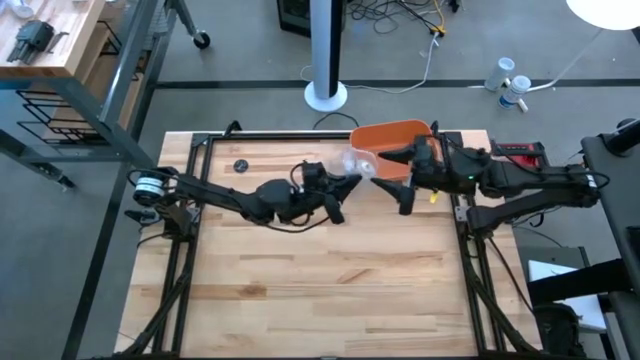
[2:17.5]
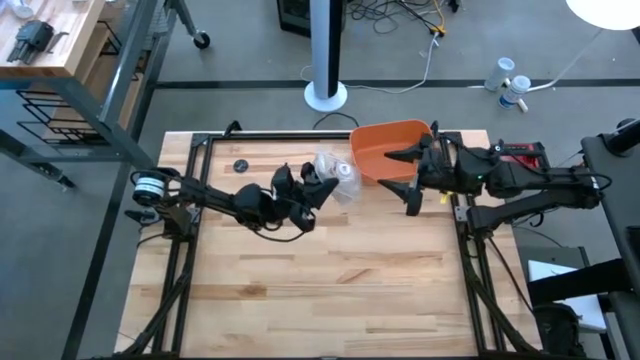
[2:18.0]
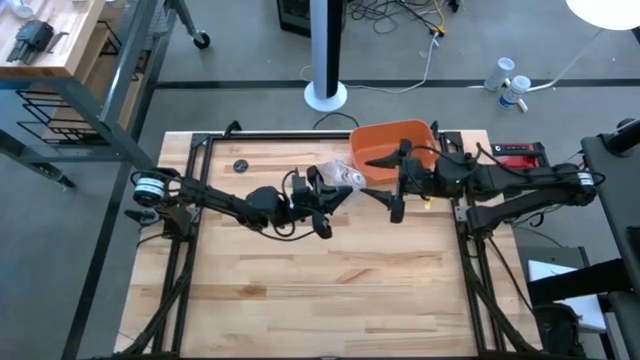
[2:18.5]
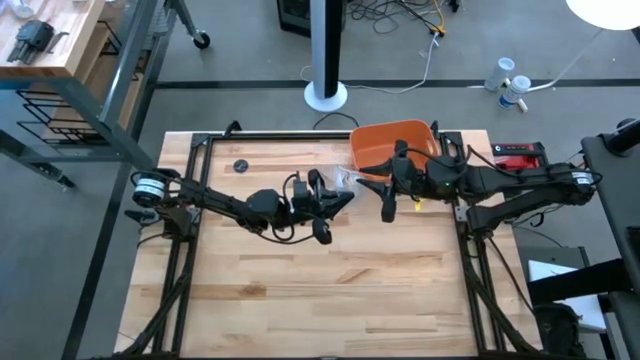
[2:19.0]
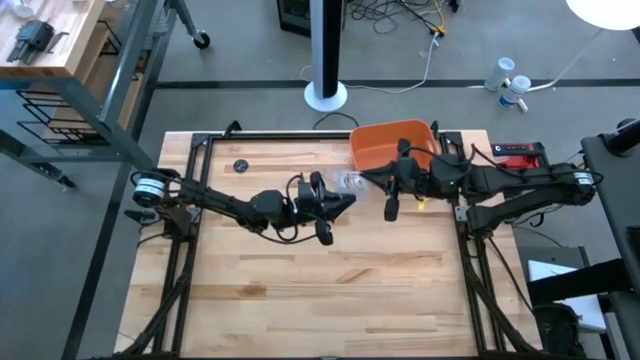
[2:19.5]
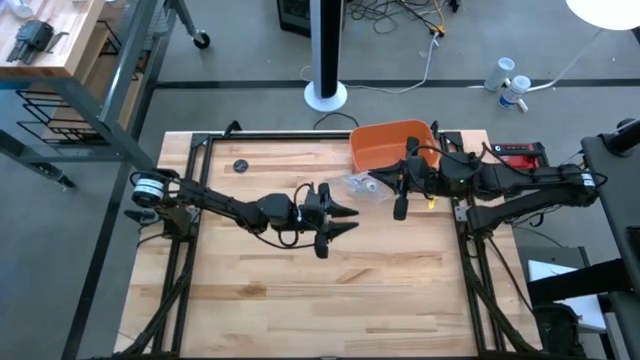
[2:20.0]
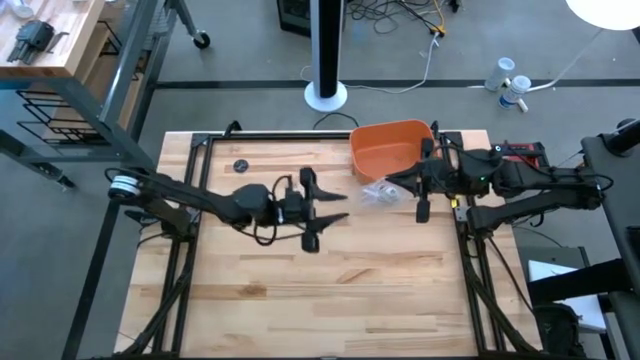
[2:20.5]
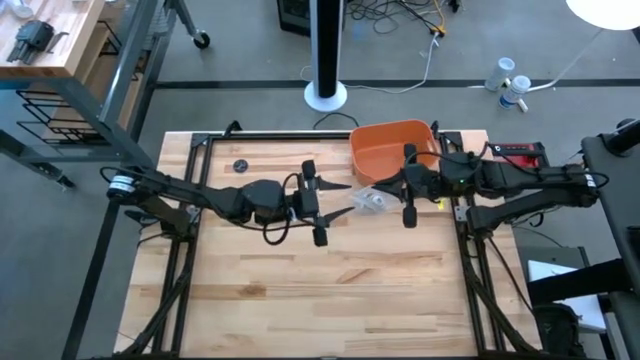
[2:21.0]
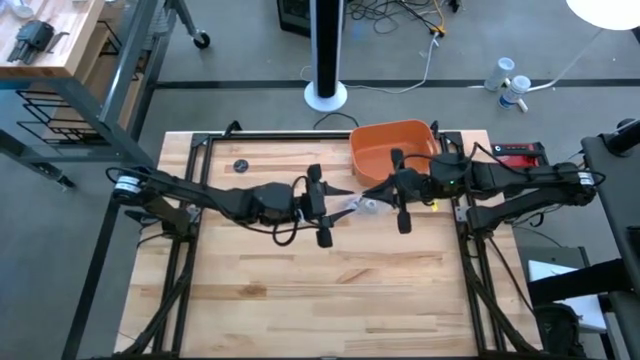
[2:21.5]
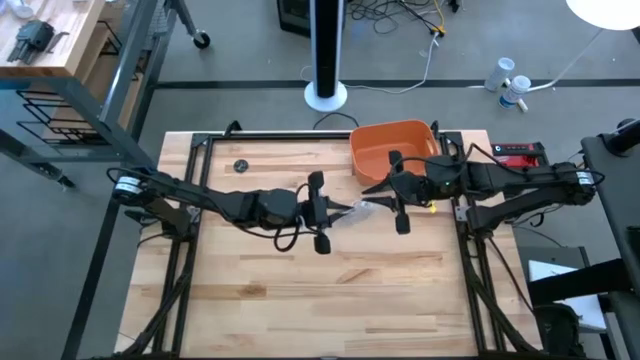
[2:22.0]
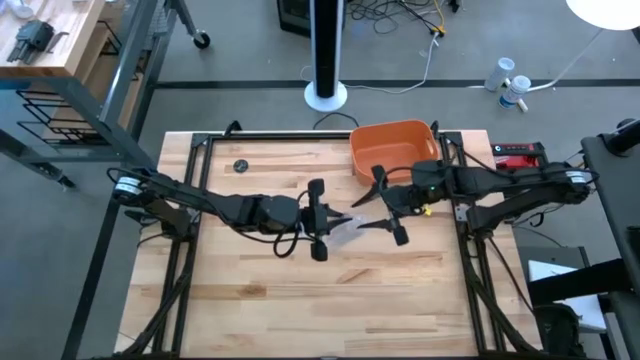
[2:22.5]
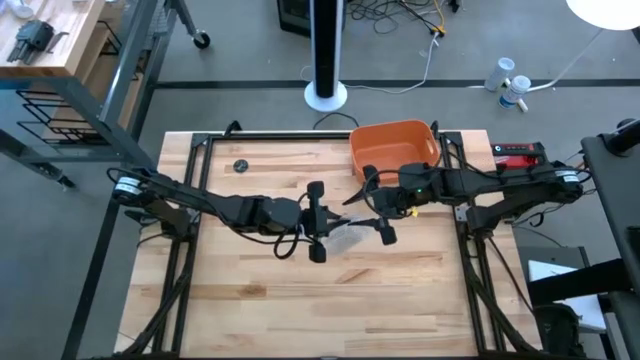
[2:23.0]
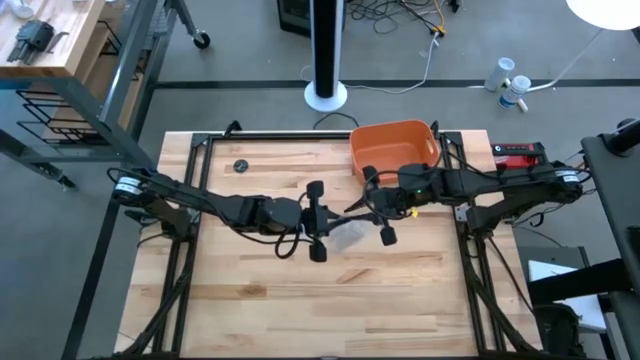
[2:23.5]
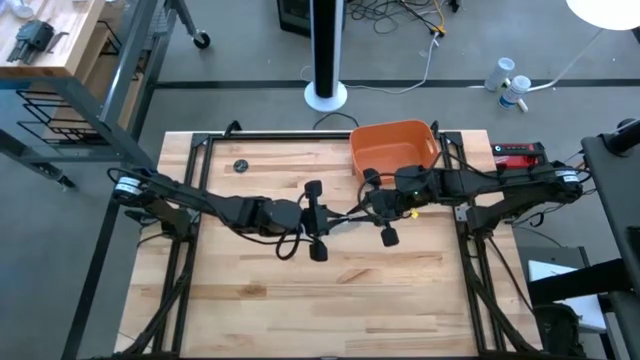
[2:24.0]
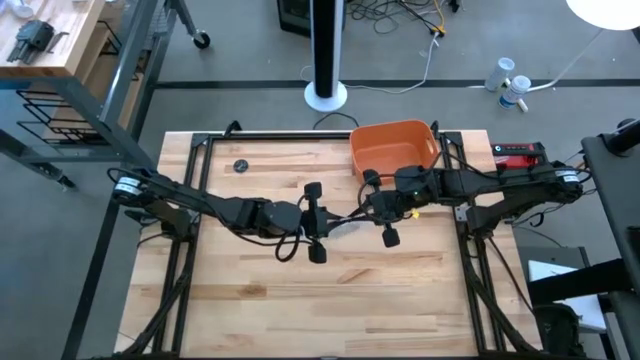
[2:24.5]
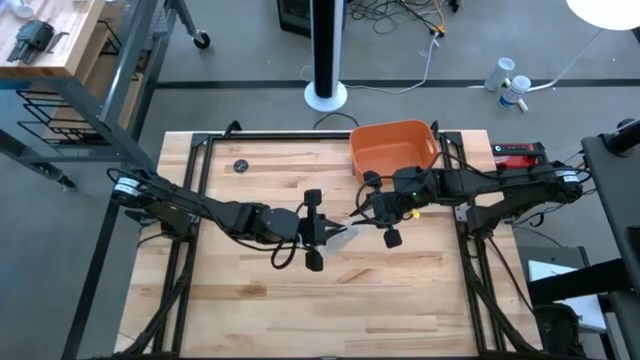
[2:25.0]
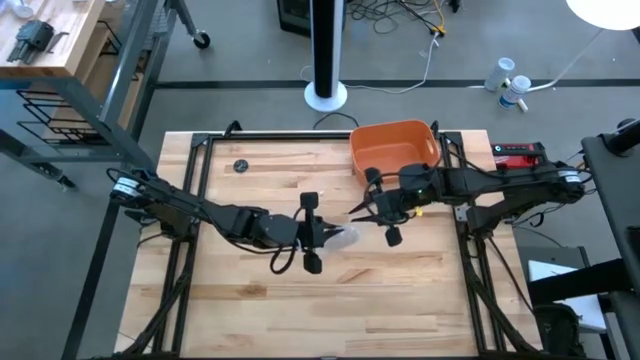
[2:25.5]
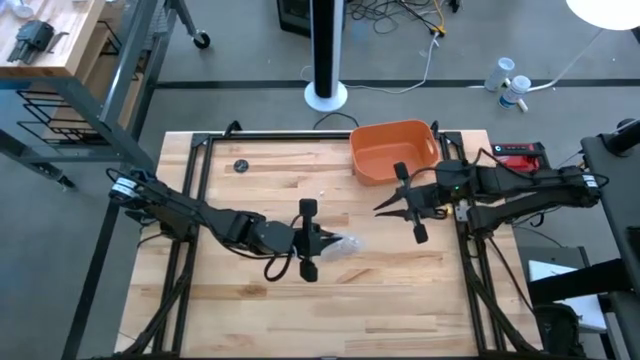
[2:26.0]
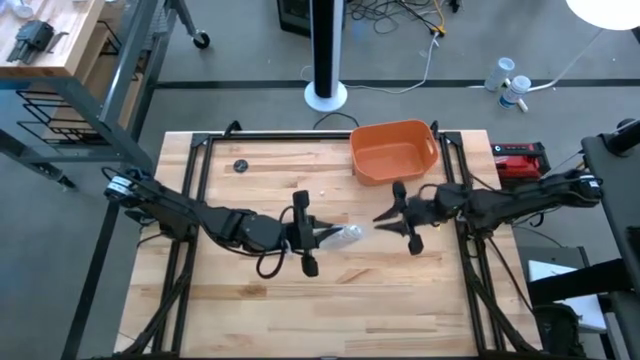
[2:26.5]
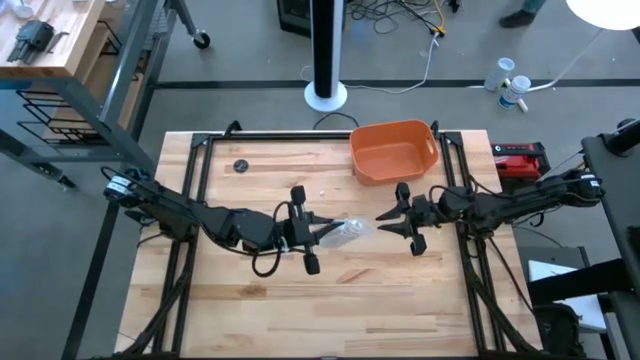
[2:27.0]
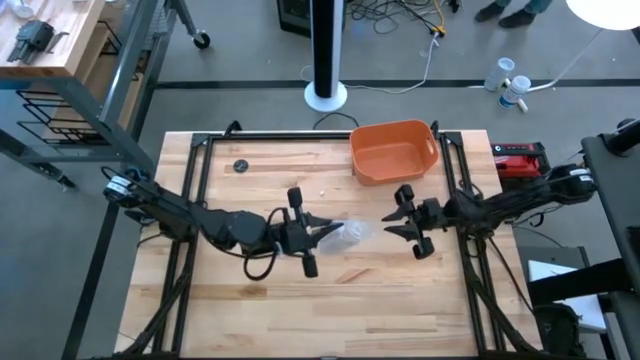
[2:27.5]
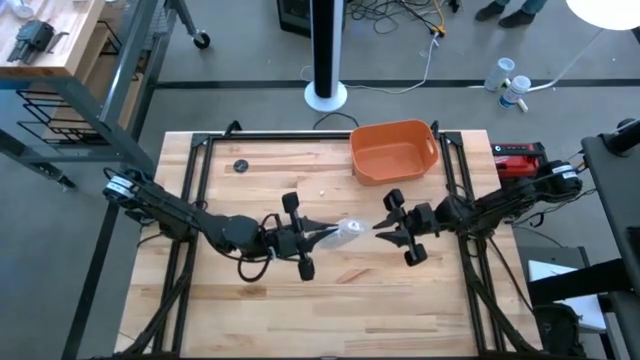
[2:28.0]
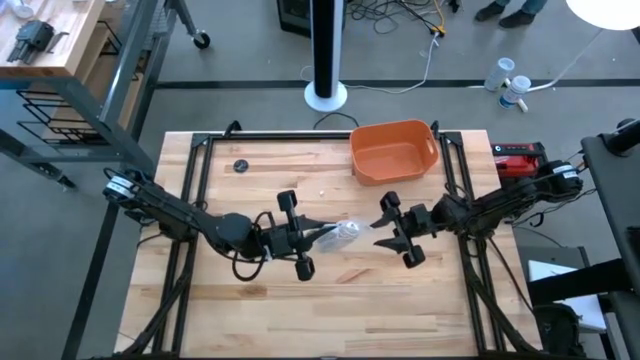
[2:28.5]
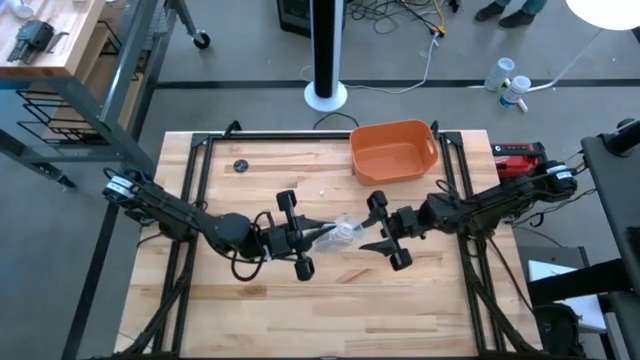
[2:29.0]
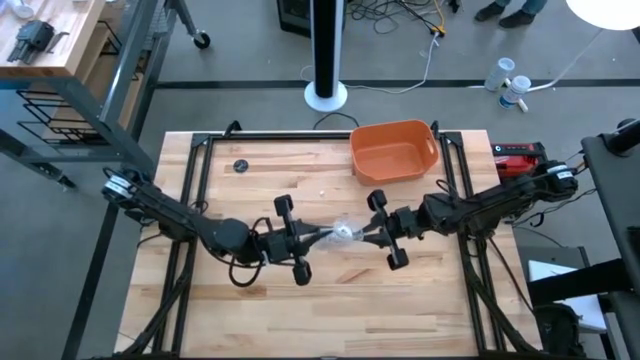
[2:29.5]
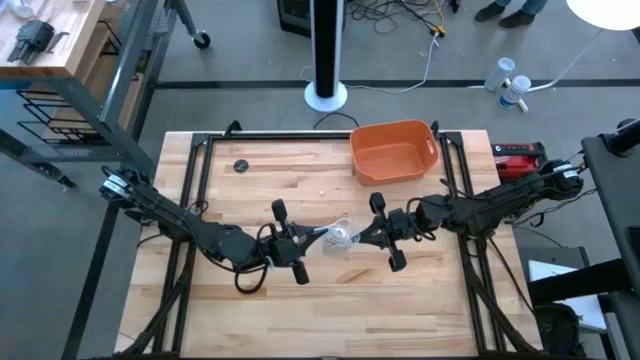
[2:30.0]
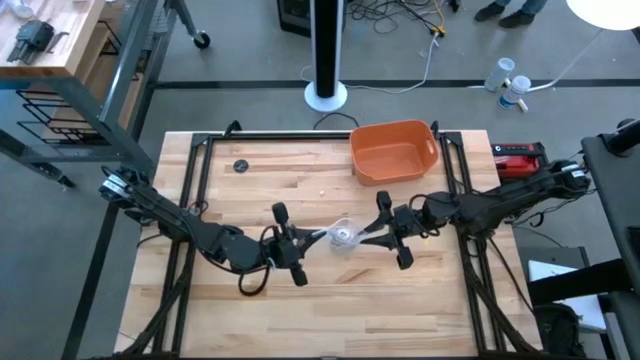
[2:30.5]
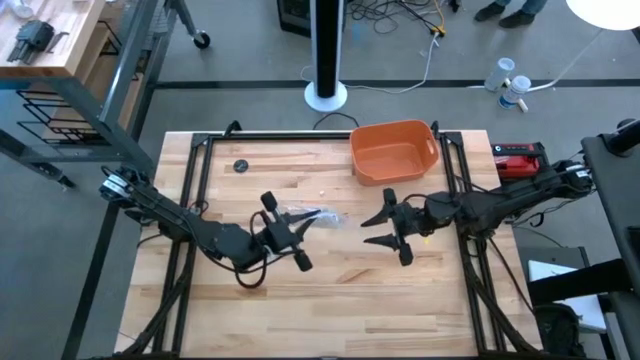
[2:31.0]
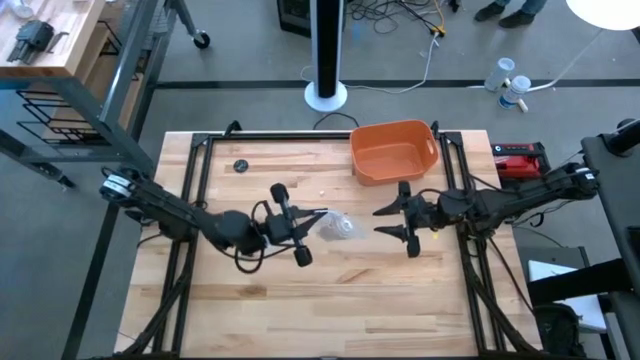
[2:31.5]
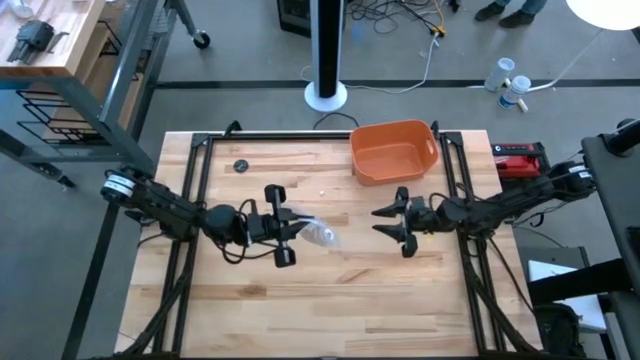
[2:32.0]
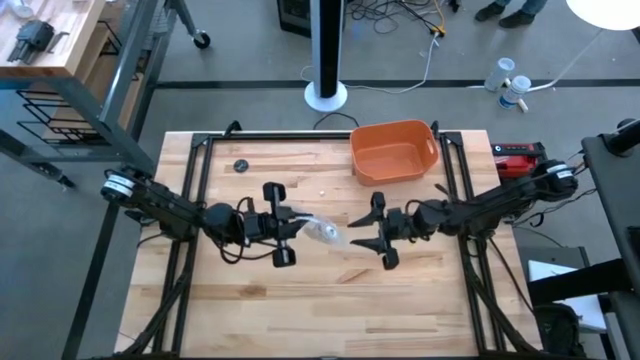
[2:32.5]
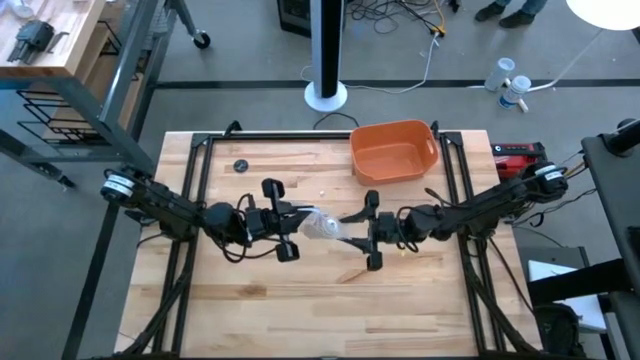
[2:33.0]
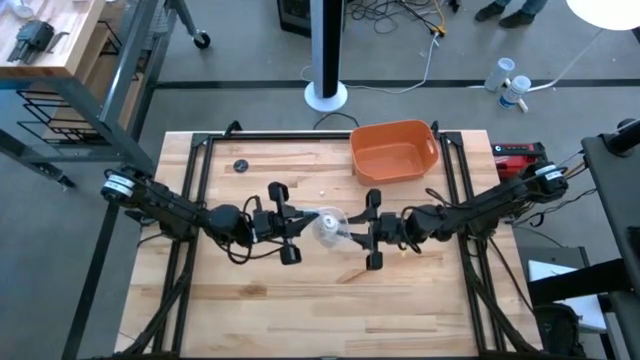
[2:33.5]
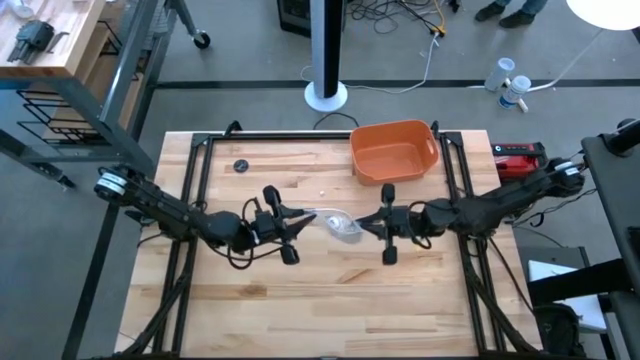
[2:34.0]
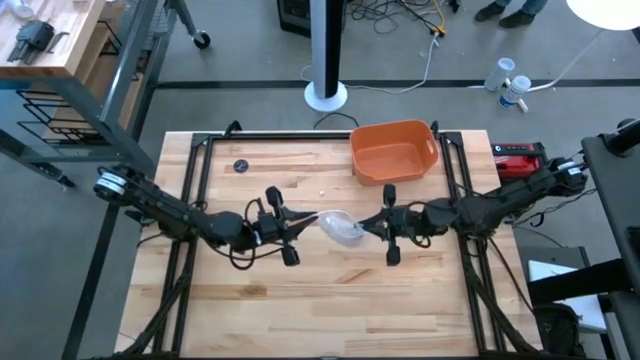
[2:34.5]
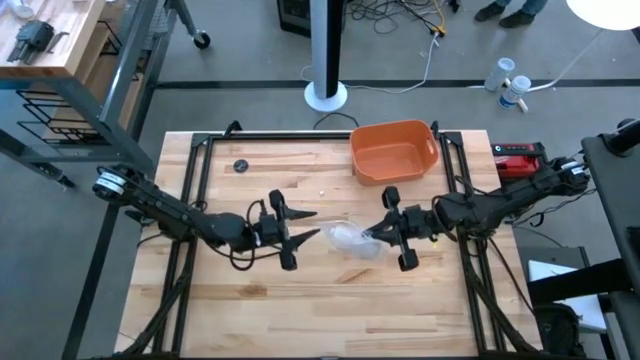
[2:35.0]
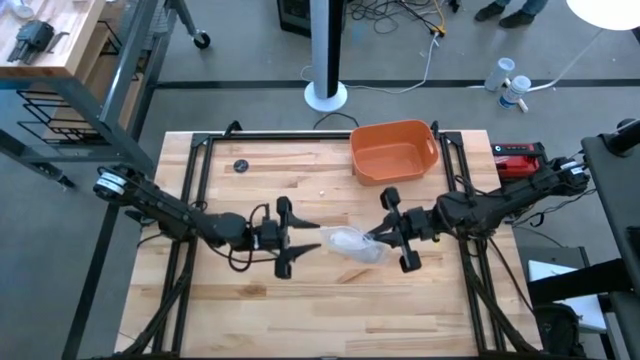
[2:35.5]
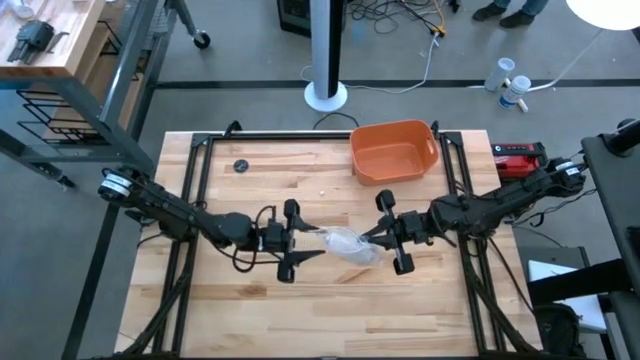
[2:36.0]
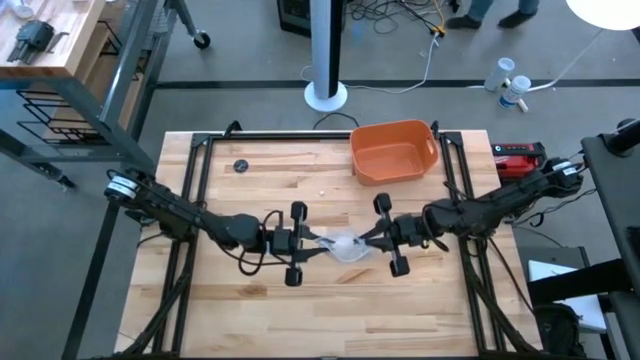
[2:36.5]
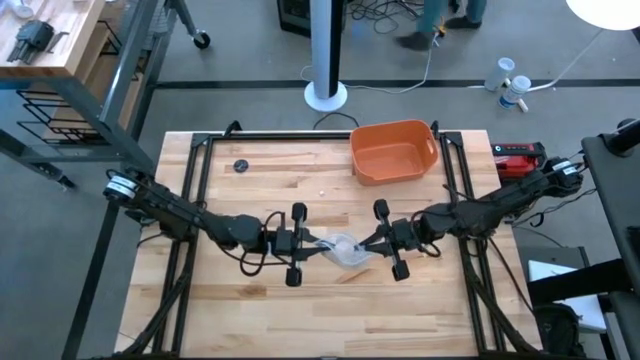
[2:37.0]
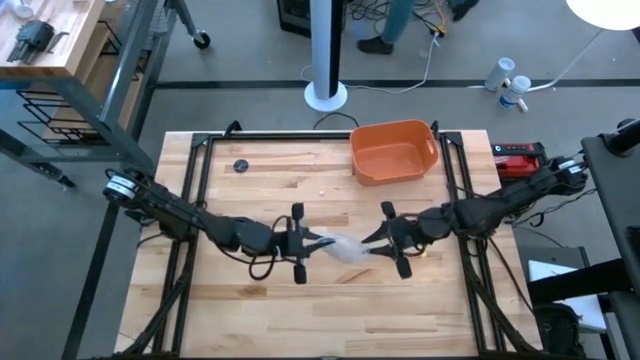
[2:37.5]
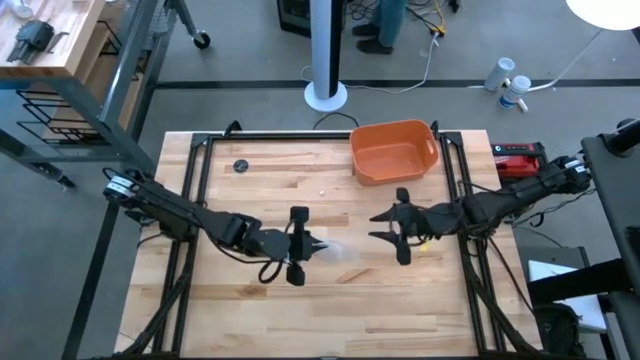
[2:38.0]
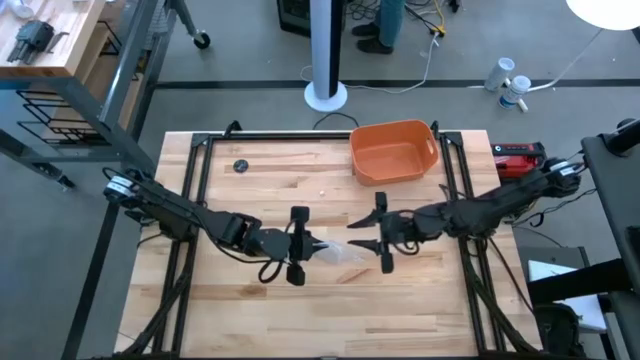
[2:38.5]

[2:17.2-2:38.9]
Task: Roll bandage
Close the transparent zip bag
